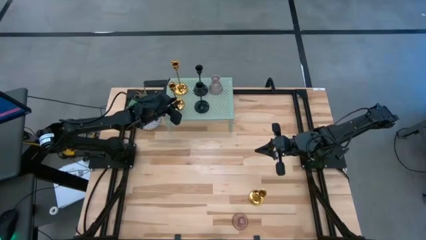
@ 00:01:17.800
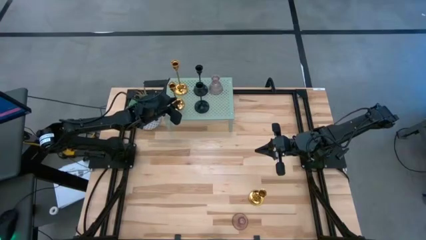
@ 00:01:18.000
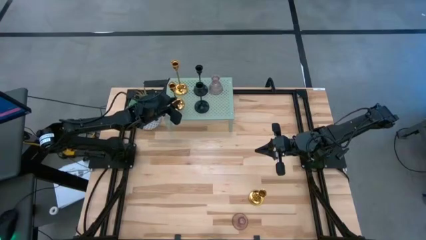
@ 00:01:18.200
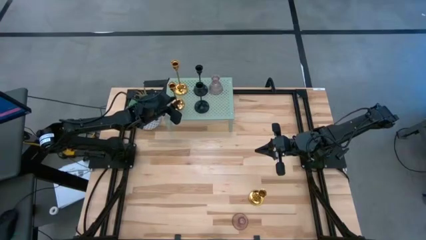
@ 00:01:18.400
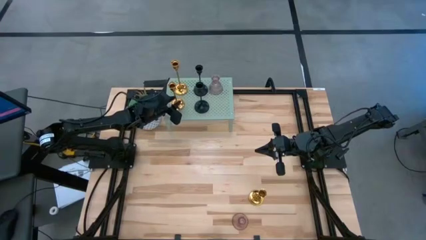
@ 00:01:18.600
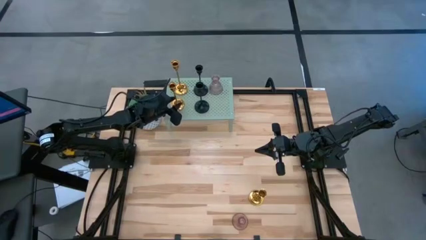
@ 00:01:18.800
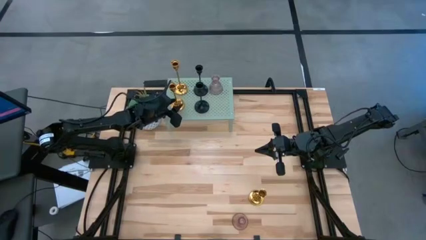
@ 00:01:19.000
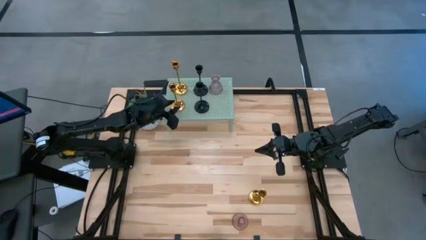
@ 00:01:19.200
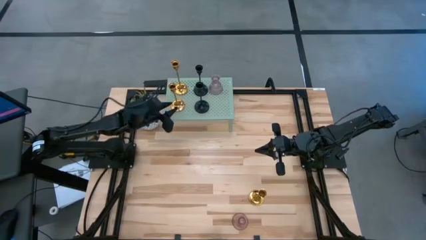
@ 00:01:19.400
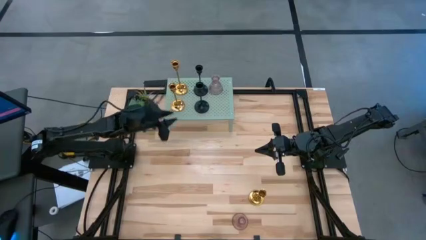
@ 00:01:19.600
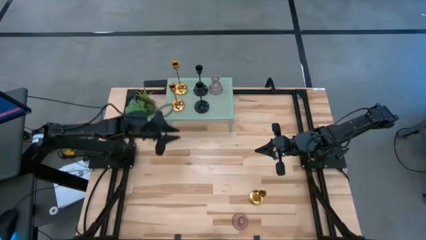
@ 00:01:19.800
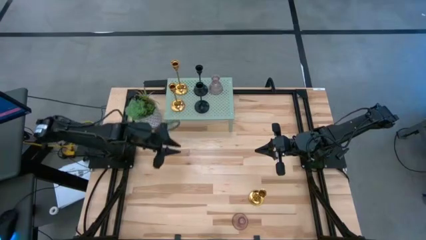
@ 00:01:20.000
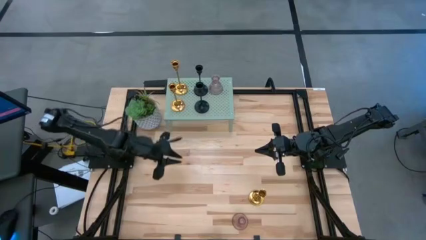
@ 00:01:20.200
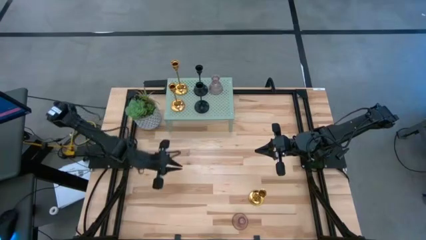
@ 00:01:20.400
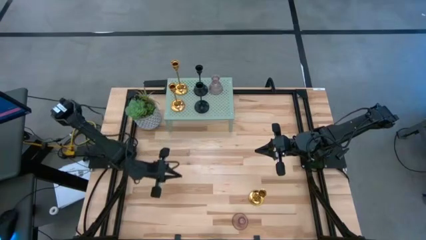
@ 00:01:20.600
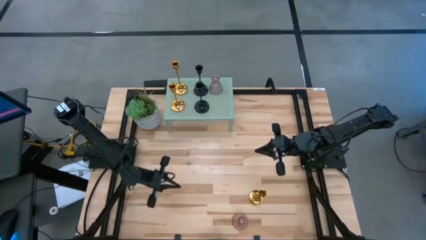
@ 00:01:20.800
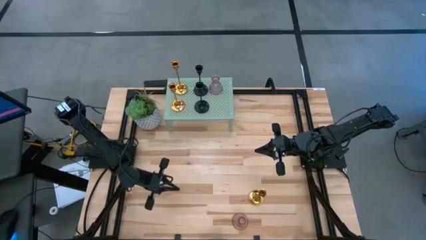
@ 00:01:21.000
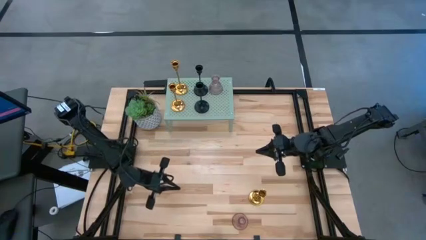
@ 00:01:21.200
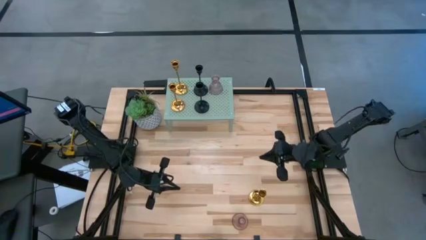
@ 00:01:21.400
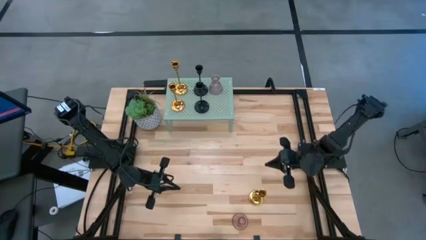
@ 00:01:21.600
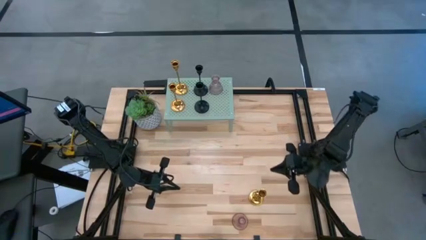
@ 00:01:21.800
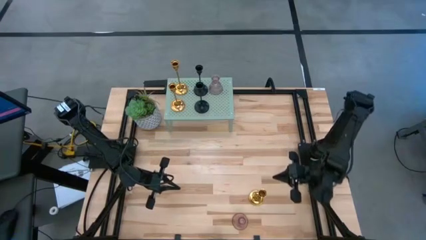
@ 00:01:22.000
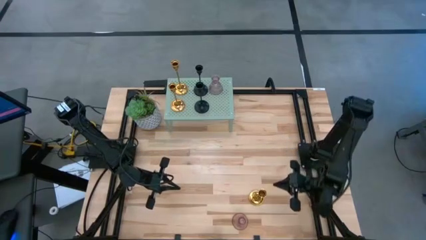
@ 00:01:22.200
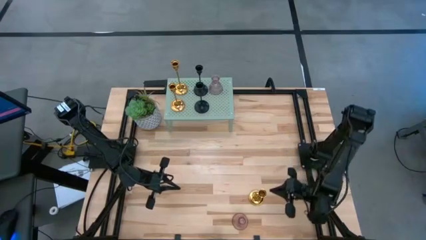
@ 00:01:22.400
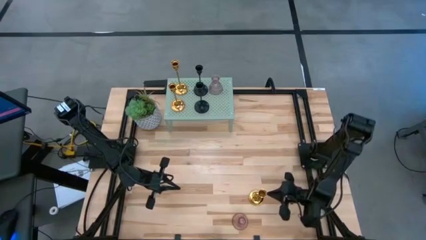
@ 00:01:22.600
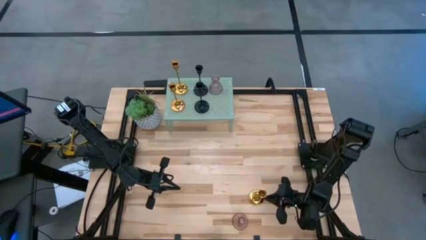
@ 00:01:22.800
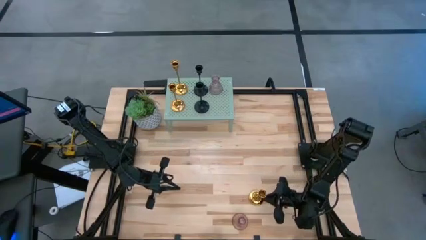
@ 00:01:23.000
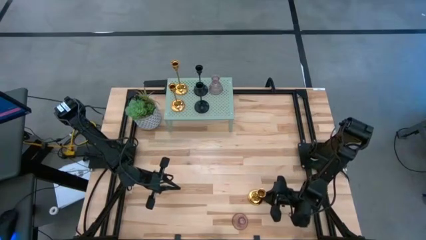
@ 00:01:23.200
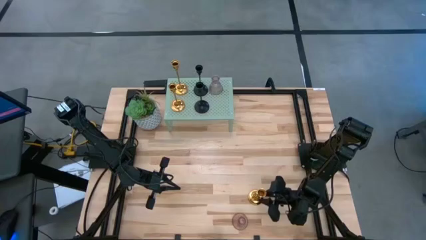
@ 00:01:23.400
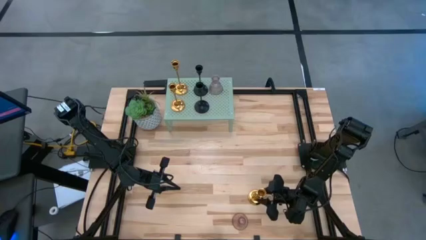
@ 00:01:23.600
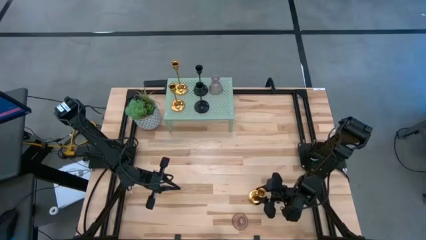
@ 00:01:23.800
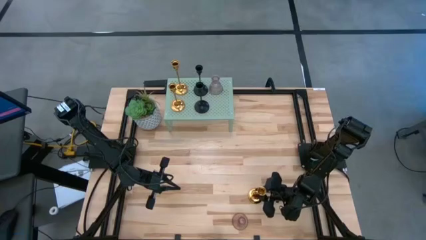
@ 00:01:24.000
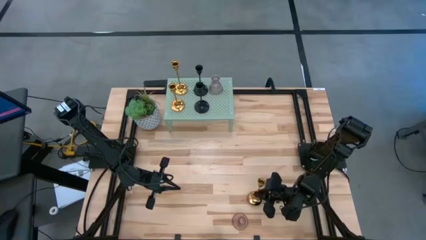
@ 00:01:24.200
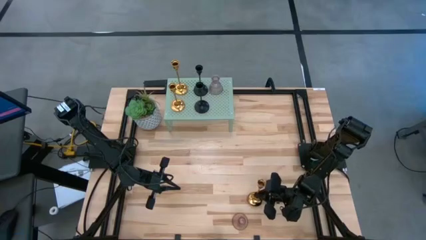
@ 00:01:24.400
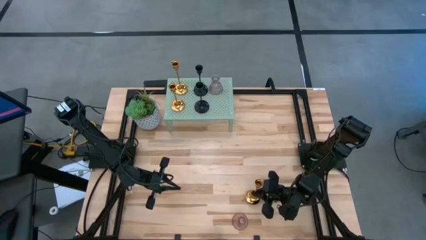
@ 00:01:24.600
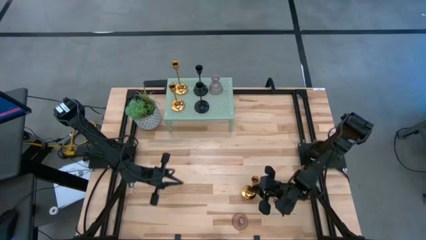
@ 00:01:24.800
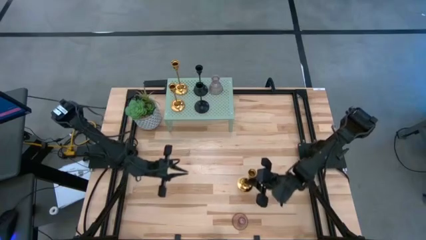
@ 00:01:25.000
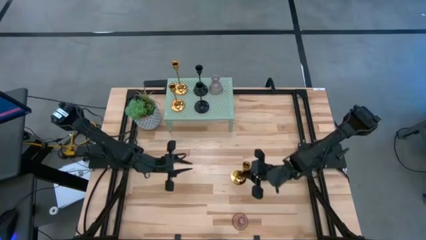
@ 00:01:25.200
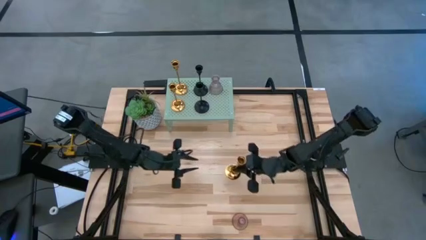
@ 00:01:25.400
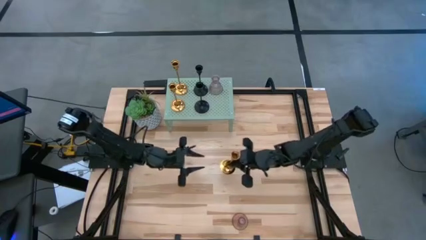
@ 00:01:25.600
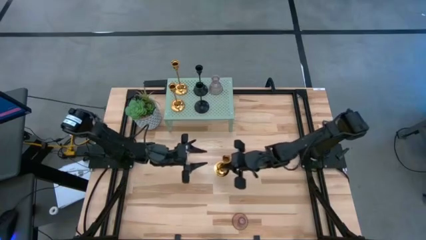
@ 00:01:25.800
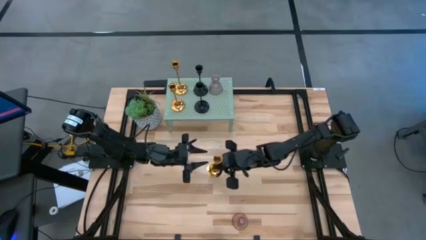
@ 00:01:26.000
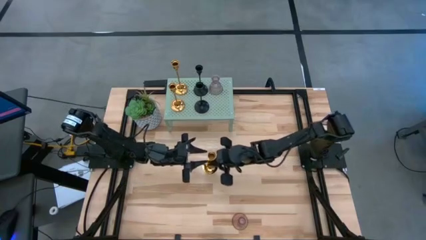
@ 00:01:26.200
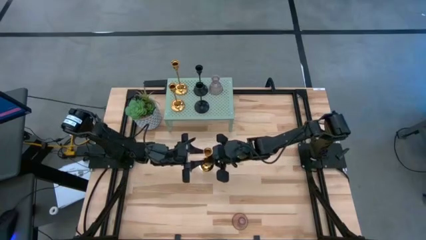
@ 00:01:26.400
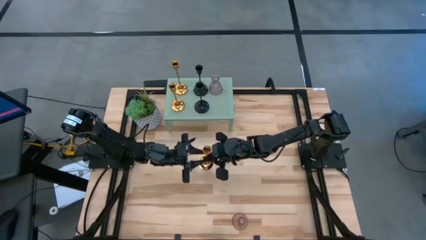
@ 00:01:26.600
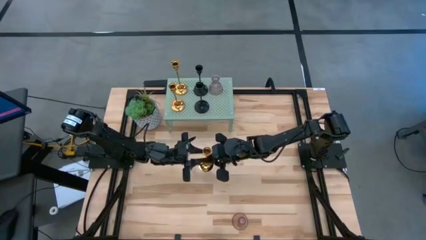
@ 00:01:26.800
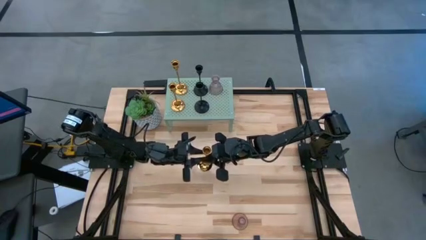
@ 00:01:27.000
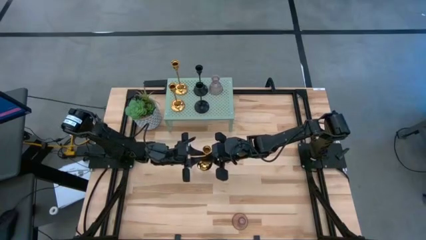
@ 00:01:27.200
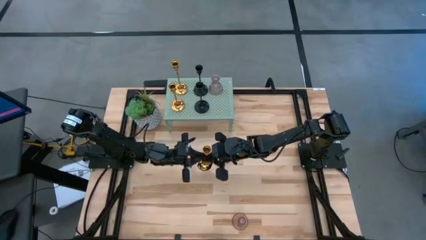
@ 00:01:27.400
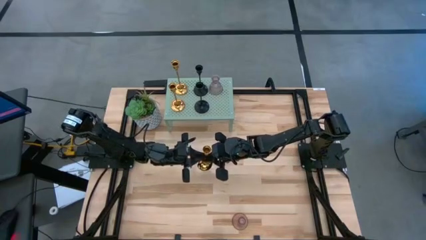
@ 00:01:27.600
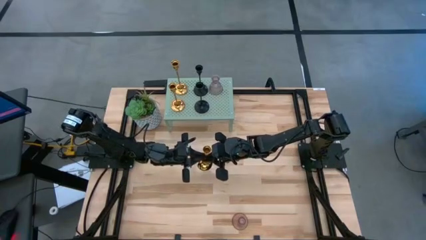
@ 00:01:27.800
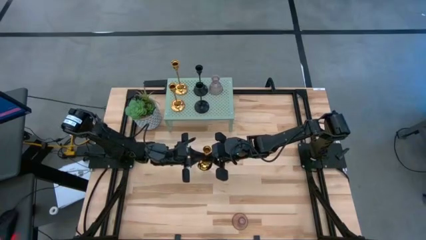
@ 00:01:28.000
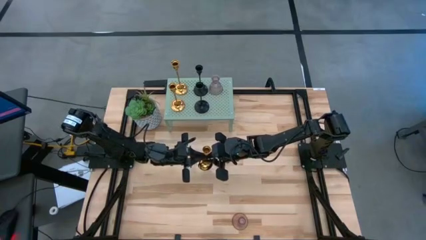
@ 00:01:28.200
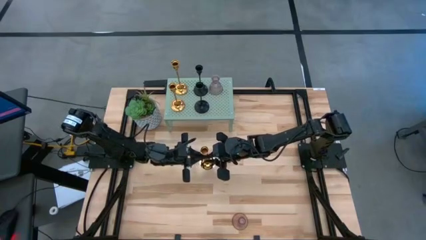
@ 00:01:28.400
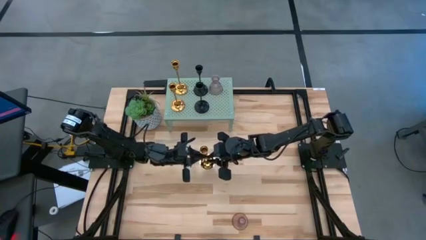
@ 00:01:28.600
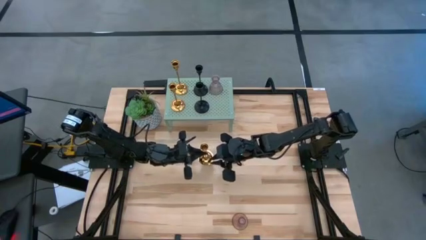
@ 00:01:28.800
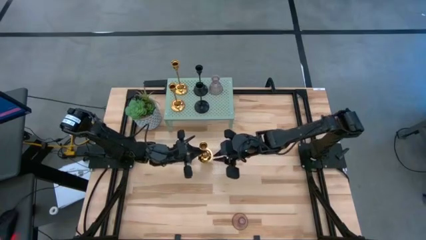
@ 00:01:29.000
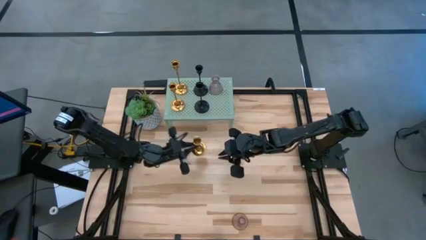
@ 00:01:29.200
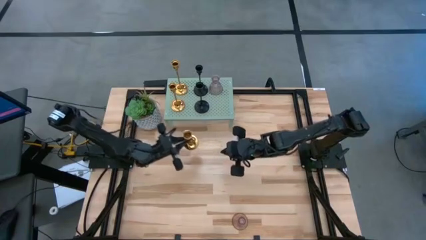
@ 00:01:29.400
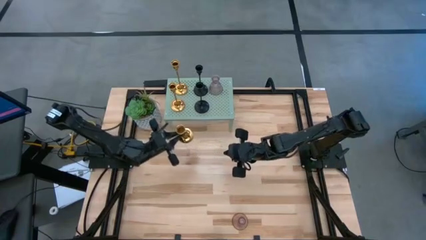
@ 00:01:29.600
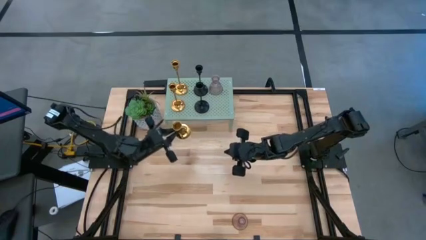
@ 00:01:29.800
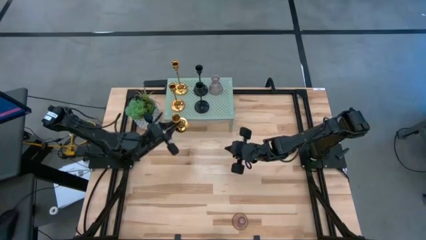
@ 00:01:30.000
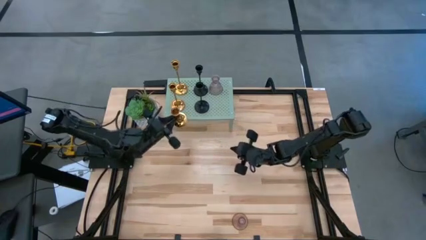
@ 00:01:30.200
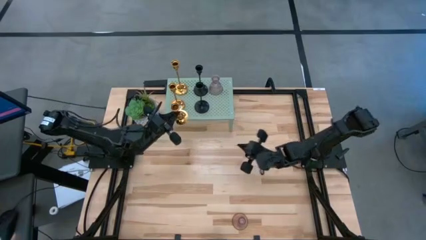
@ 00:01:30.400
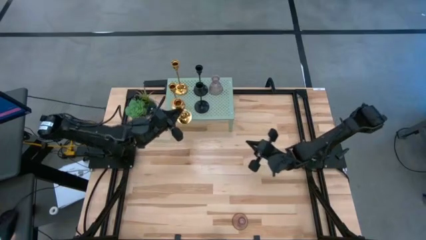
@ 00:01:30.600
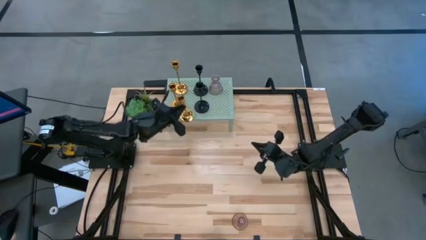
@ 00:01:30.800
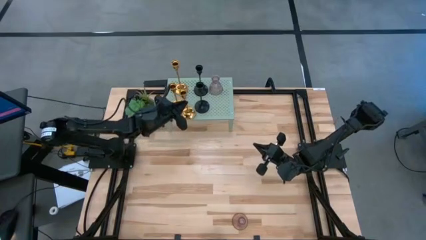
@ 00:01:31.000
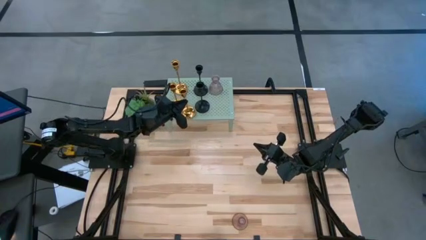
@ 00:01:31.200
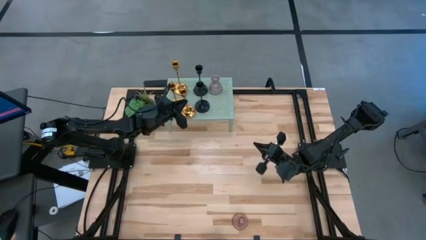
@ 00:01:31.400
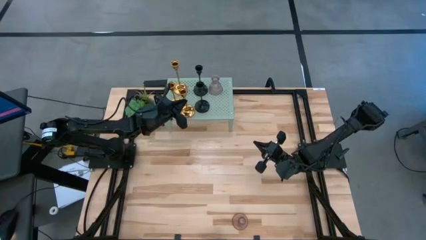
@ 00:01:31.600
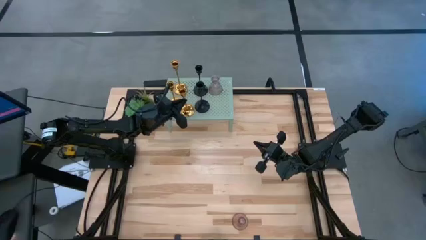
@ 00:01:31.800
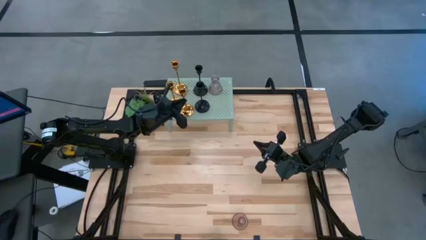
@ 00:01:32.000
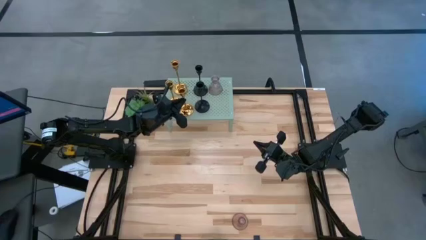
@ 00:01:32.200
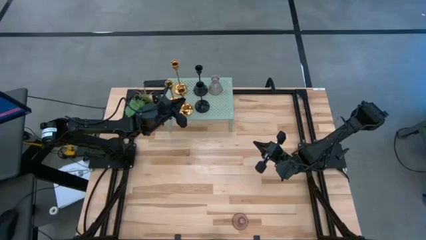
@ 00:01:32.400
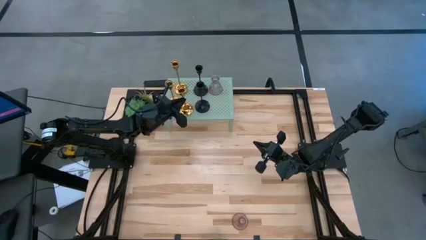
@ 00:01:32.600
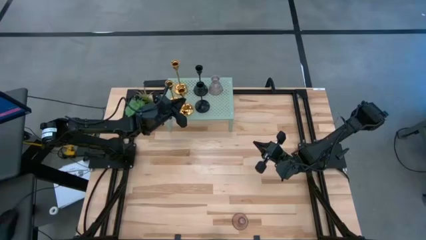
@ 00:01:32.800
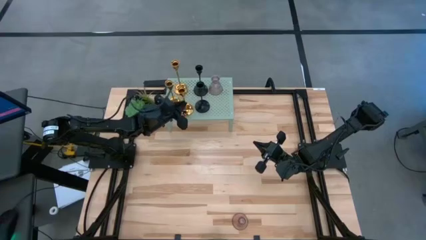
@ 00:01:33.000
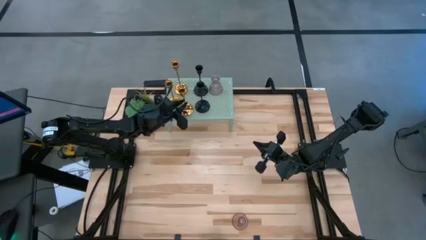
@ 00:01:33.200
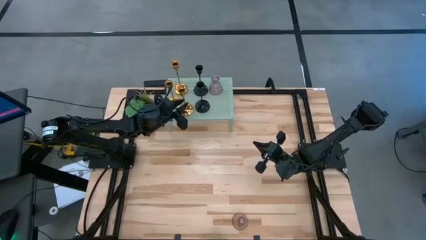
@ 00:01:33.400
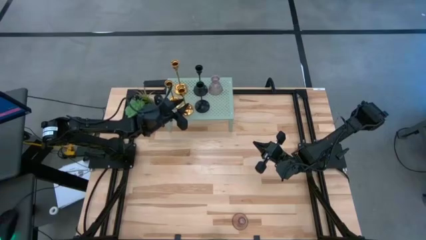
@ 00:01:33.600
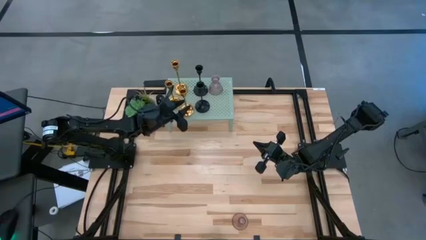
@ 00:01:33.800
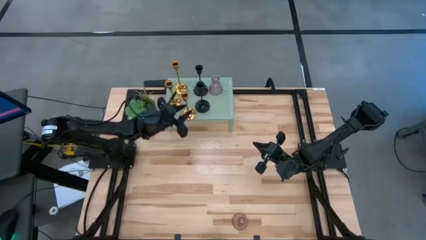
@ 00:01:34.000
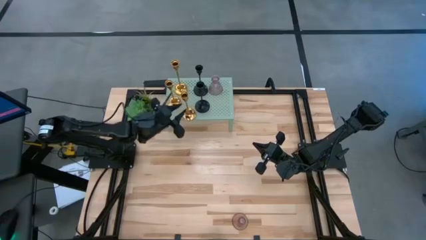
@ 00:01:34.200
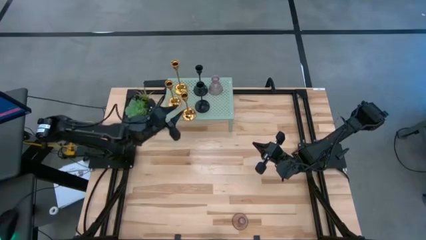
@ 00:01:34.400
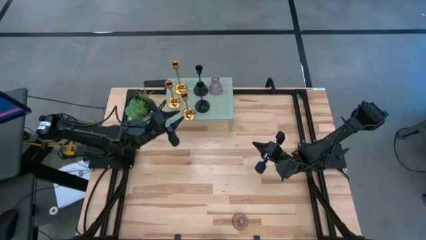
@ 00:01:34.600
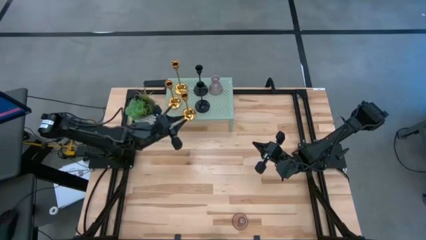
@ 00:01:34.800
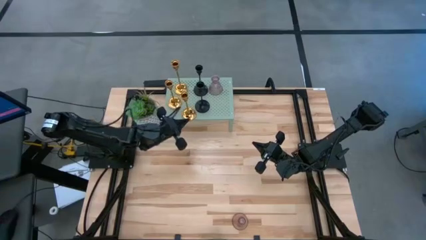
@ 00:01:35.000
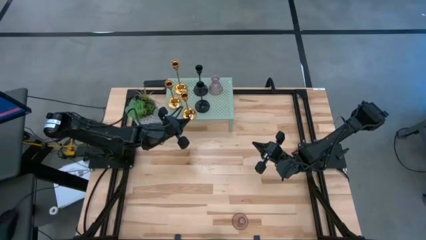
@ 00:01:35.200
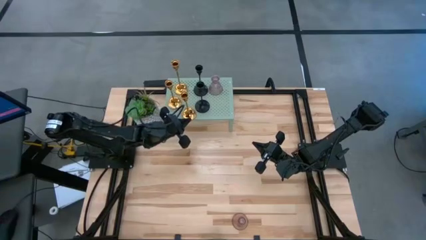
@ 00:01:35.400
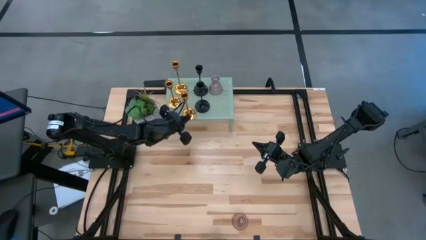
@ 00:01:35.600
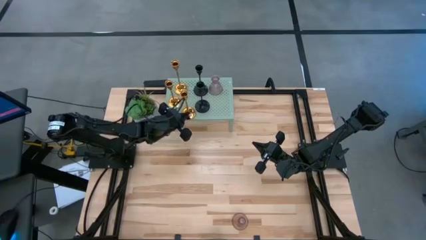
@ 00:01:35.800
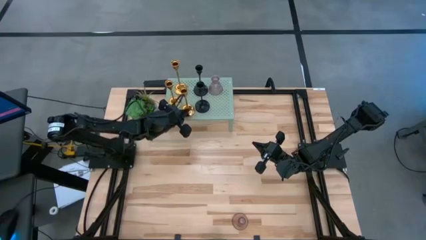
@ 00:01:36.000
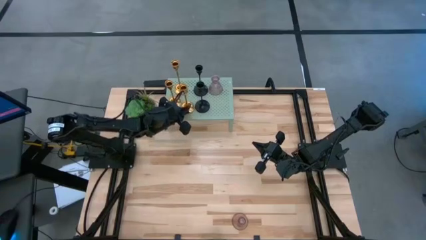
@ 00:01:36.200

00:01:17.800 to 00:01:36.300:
Task: Pick & Place candle stick holders
Put the golden candle holder on the shelf
